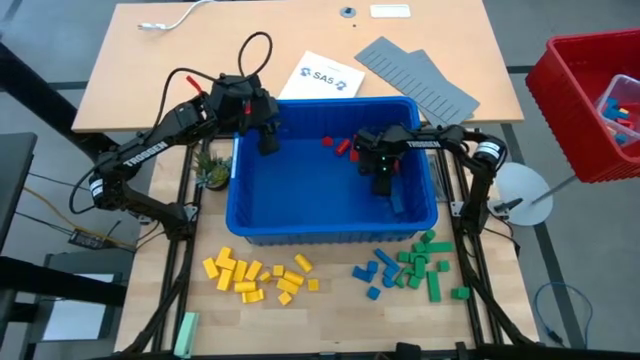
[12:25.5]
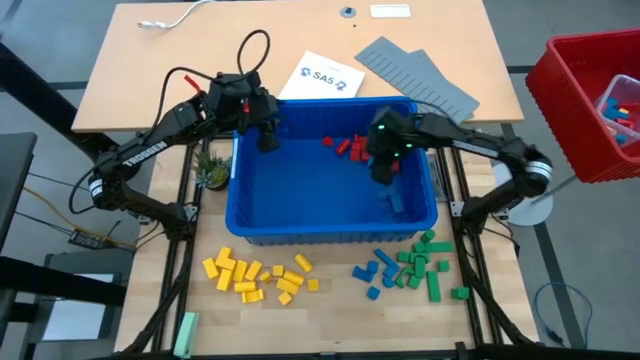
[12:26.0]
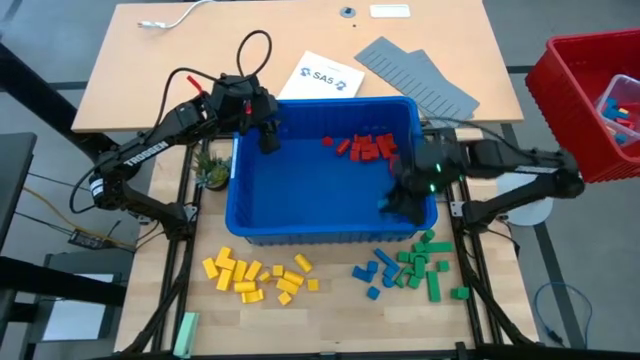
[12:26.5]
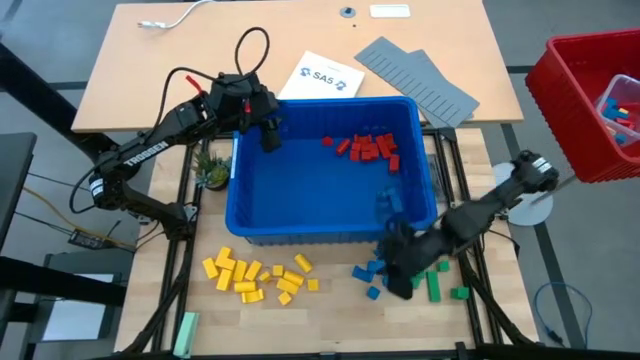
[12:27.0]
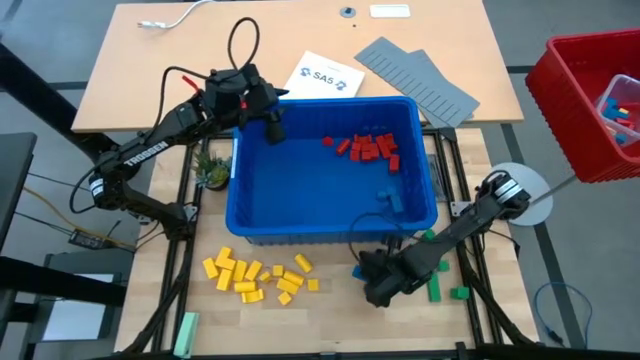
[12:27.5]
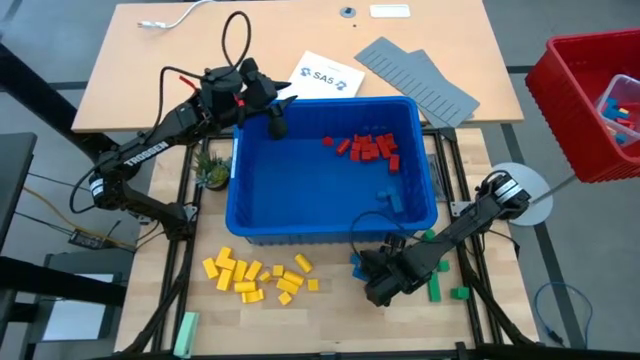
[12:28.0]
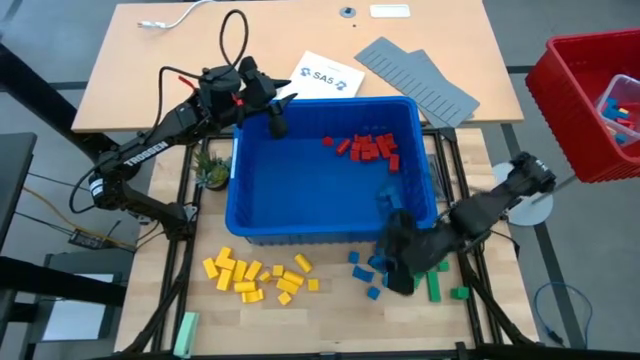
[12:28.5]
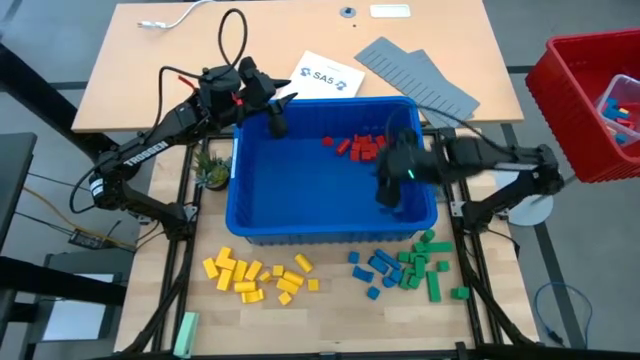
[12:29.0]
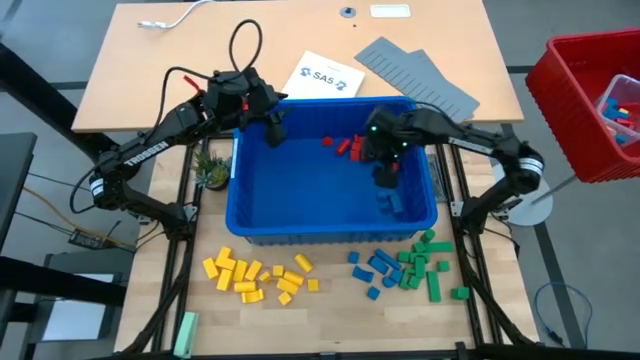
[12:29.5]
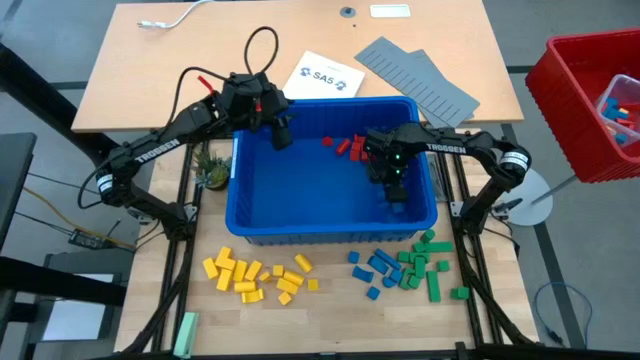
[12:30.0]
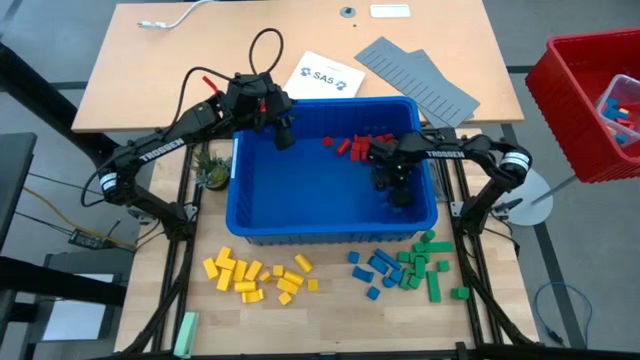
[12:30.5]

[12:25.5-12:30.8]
Task: Sort blocks
Remove the blue block from the blue bin

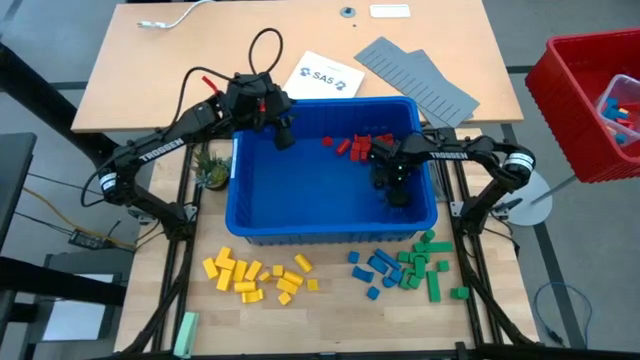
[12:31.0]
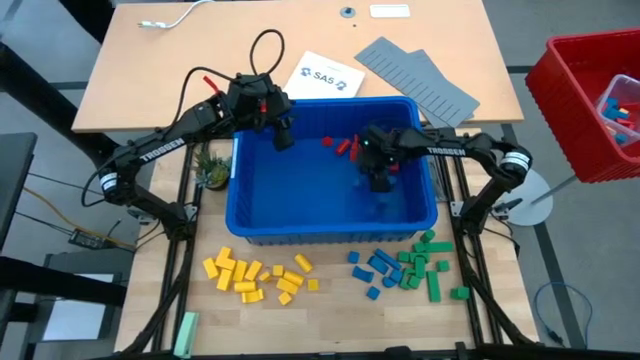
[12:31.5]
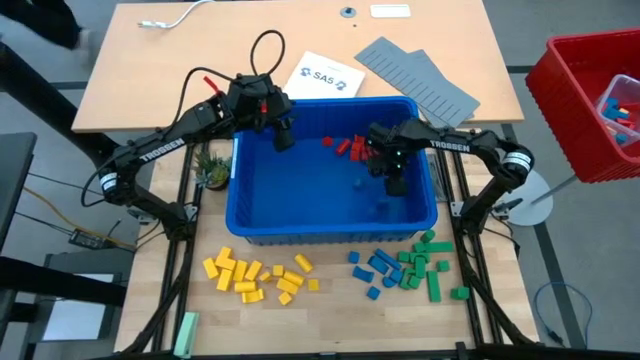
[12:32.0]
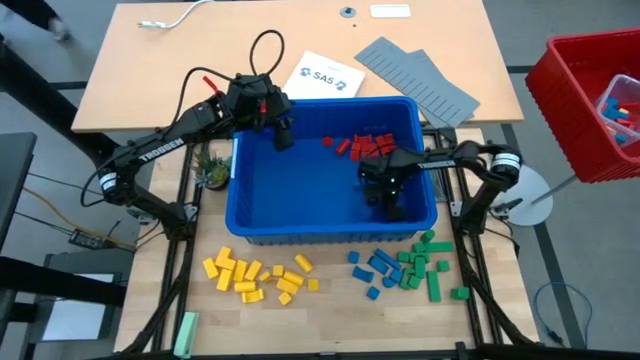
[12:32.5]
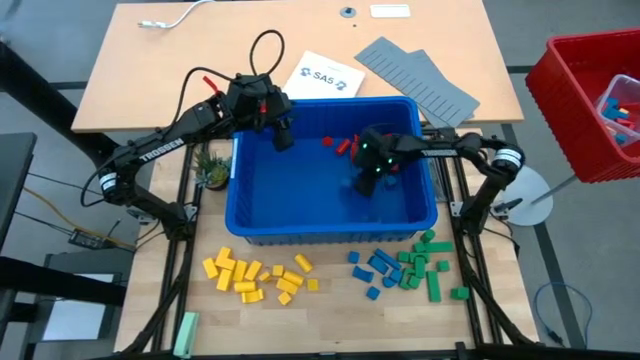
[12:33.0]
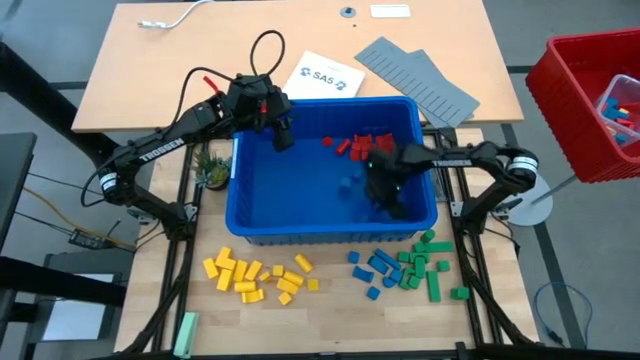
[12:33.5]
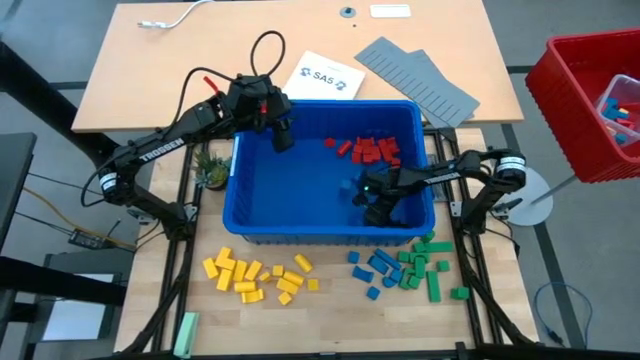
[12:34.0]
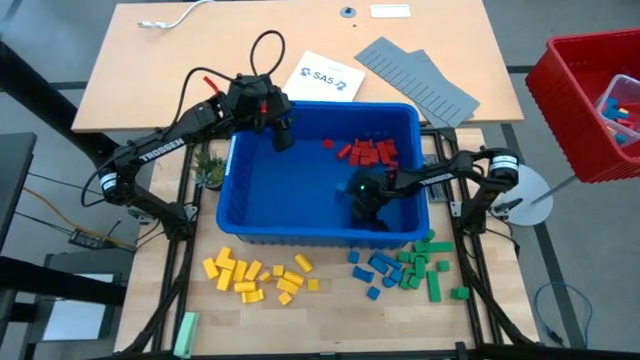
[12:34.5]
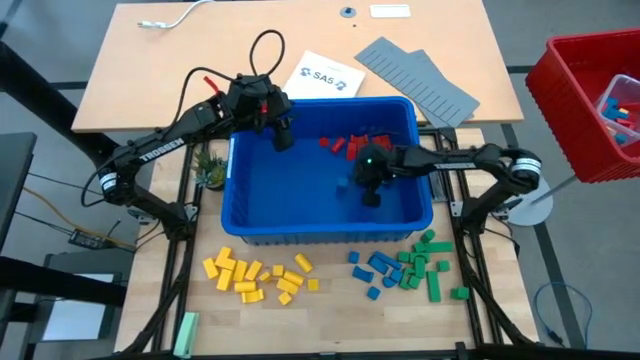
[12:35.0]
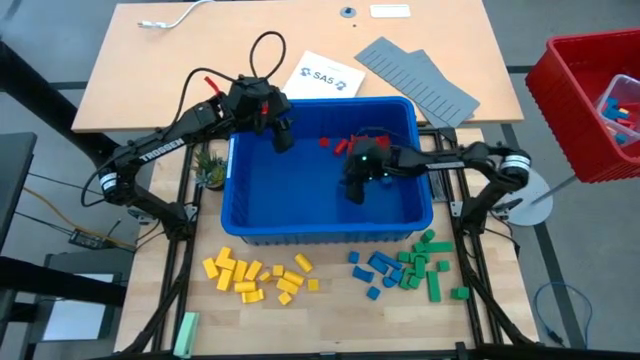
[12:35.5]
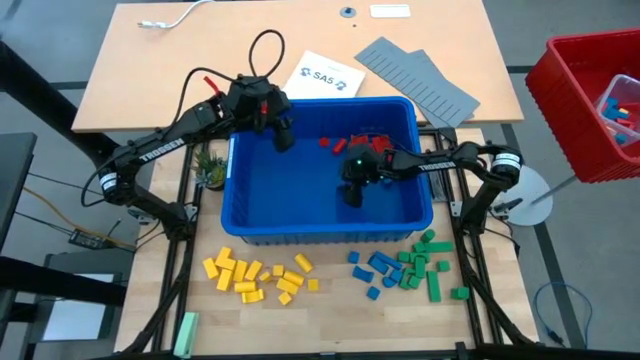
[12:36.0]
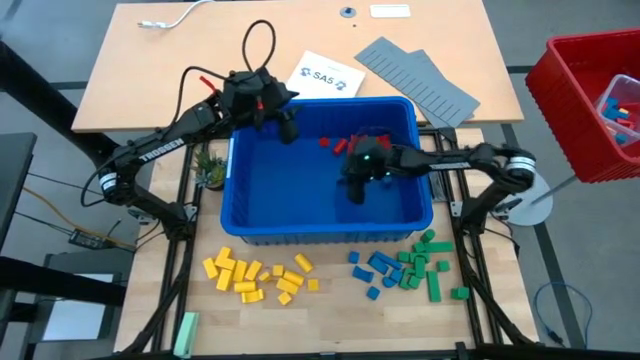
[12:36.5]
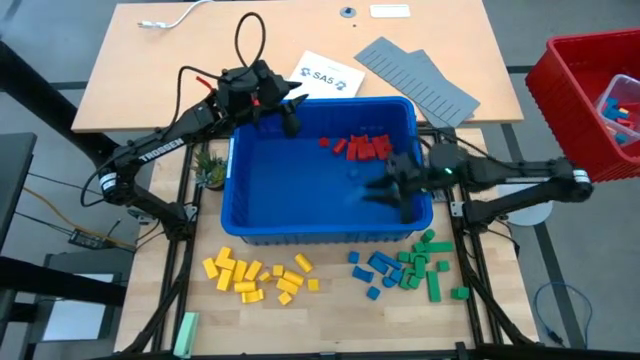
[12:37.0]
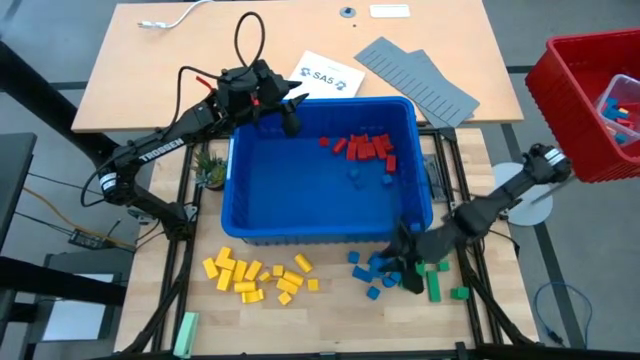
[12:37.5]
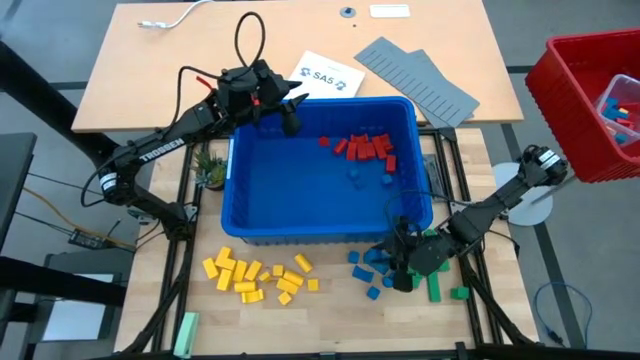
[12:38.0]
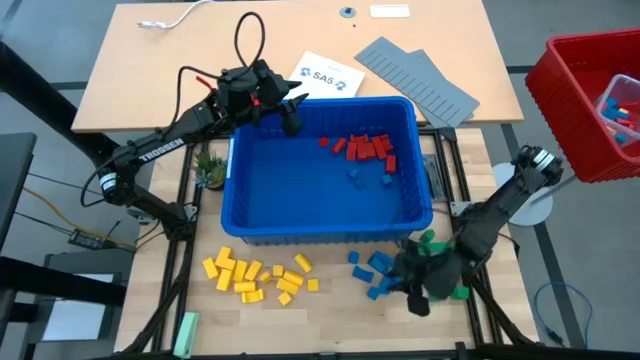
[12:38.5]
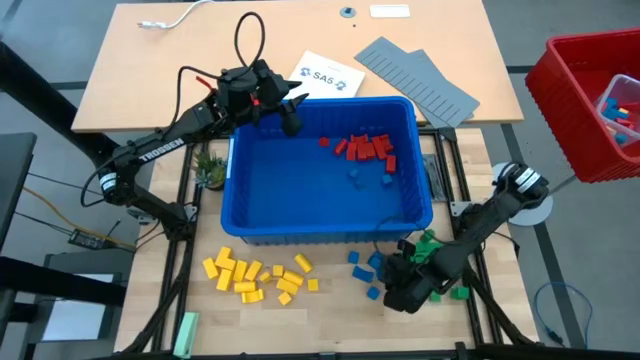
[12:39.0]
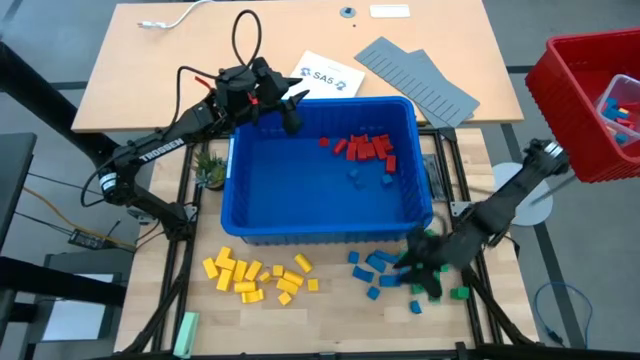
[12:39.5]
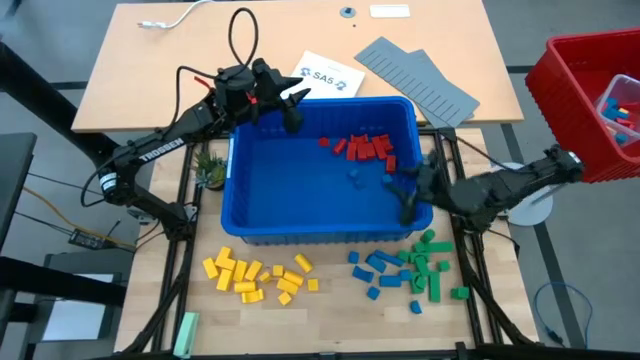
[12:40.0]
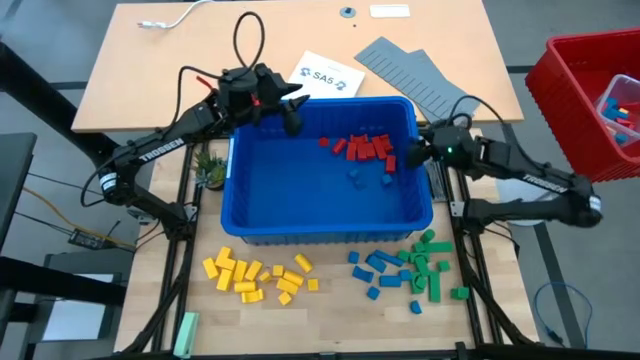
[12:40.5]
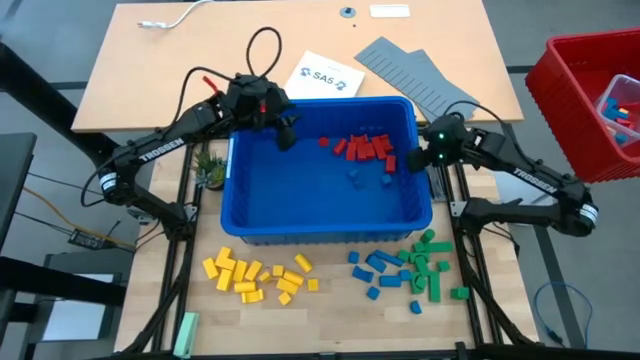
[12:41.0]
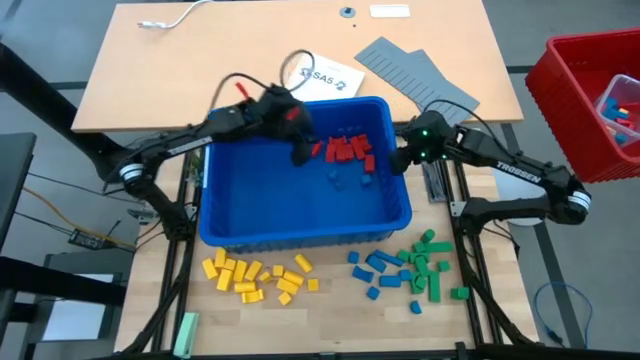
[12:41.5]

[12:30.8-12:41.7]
Remove the blue block from the blue bin
